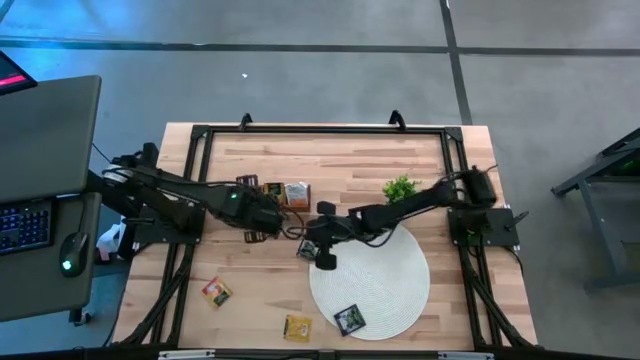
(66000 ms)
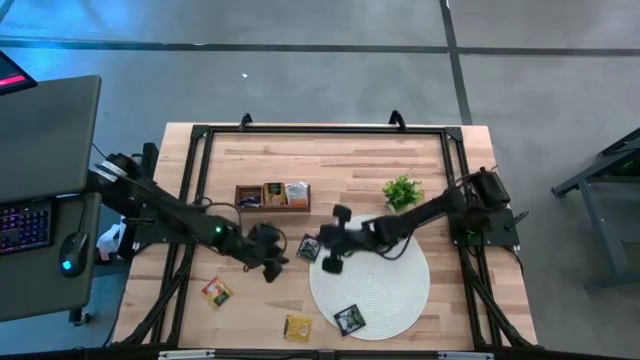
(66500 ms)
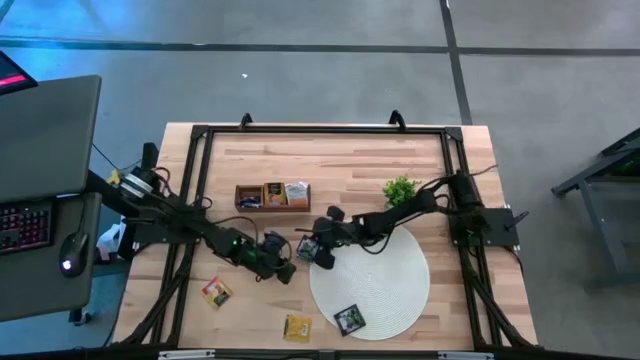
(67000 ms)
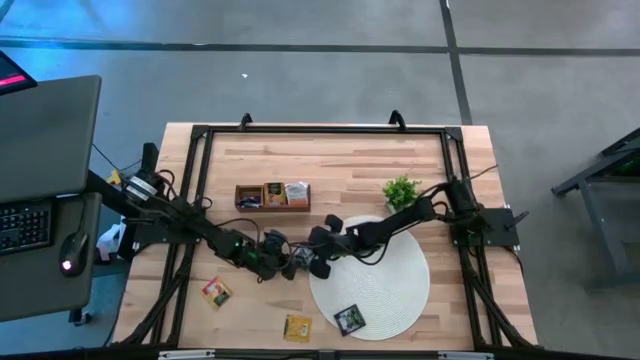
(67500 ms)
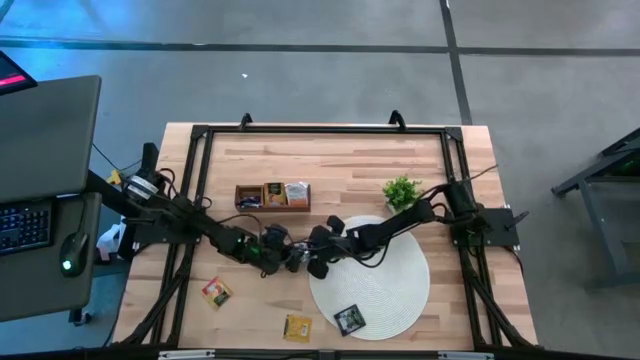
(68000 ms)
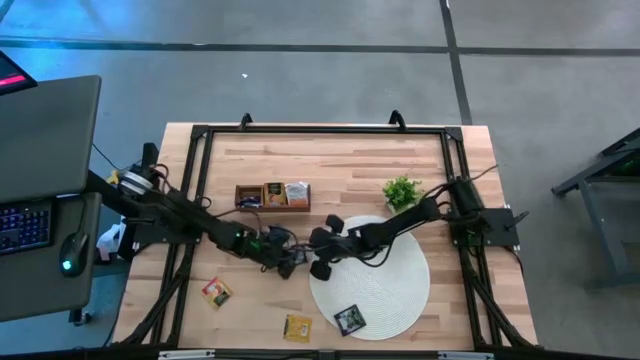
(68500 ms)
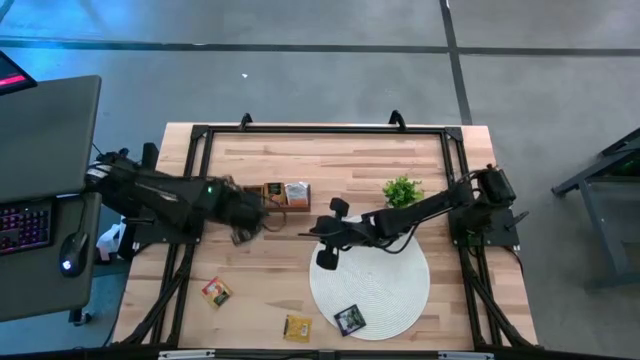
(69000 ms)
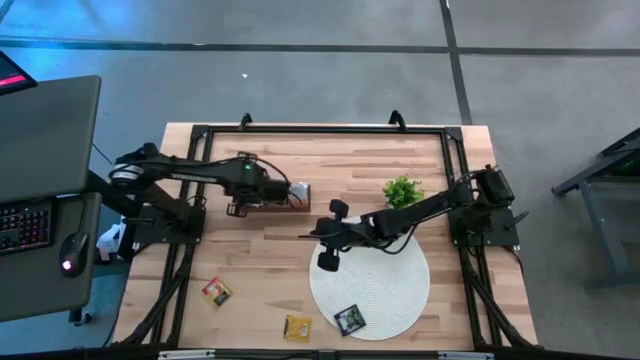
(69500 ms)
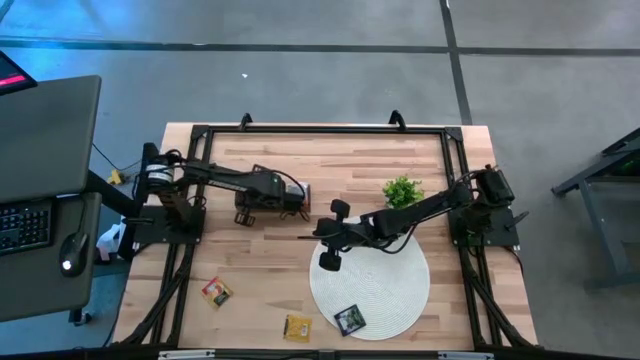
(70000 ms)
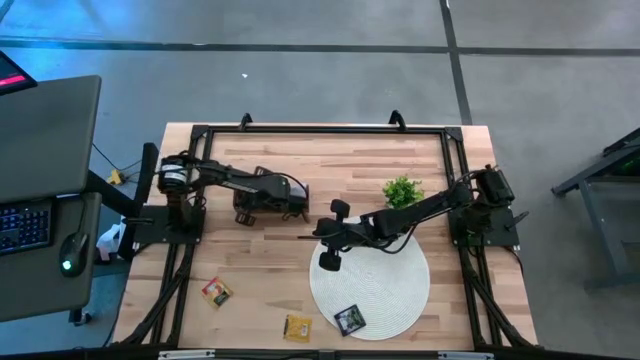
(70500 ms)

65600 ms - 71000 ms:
Task: Pick & Place Tea
Put the violet tea bag into the left section of the wooden organizer

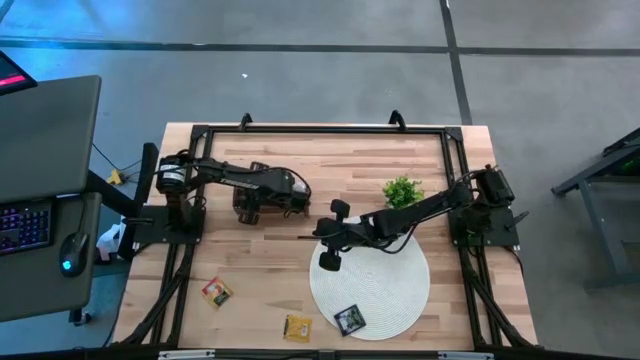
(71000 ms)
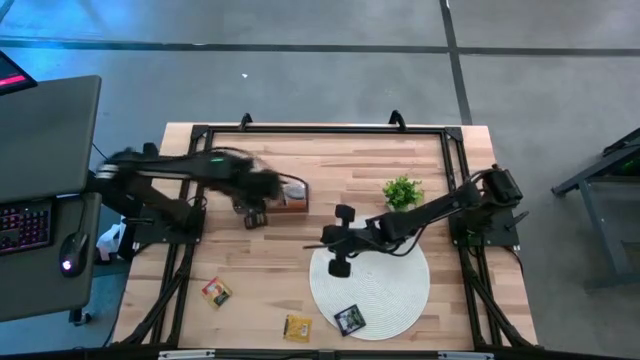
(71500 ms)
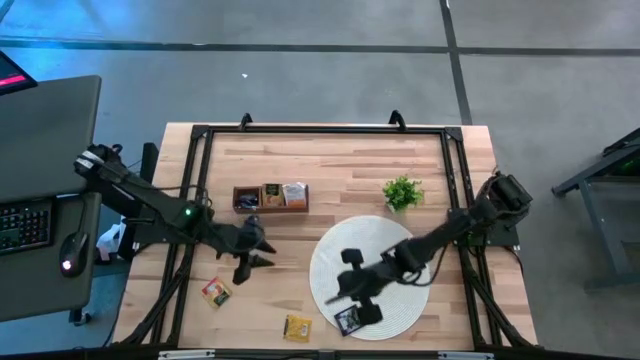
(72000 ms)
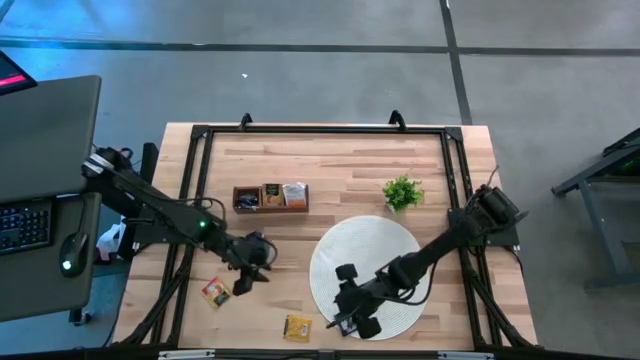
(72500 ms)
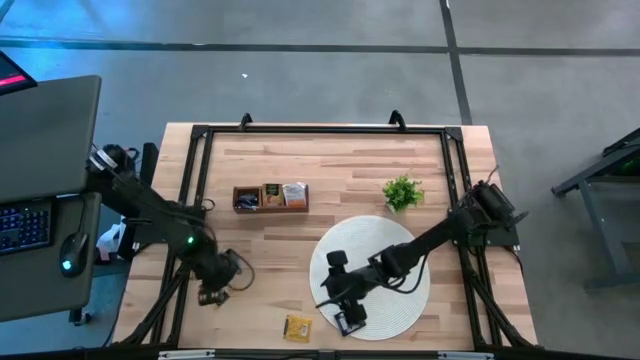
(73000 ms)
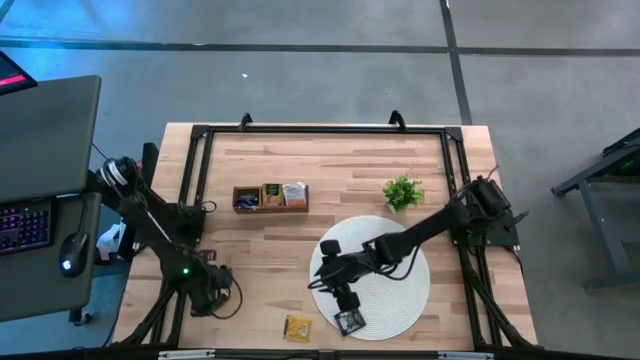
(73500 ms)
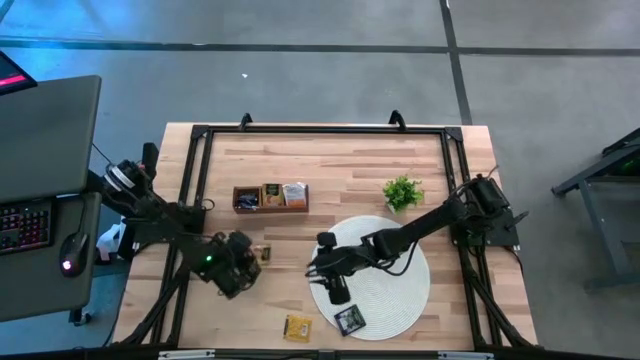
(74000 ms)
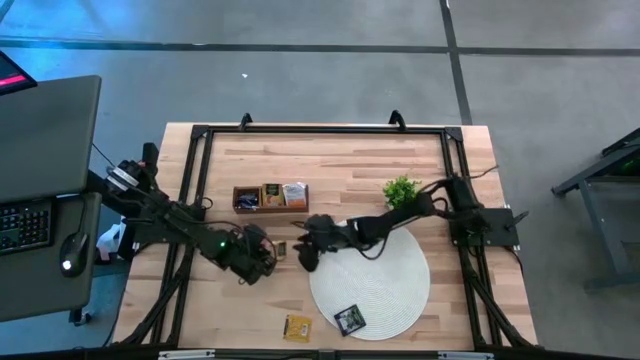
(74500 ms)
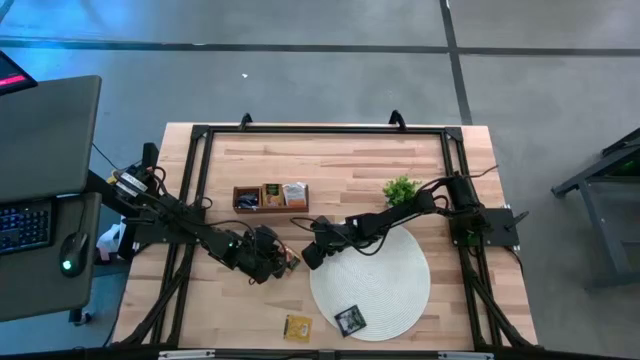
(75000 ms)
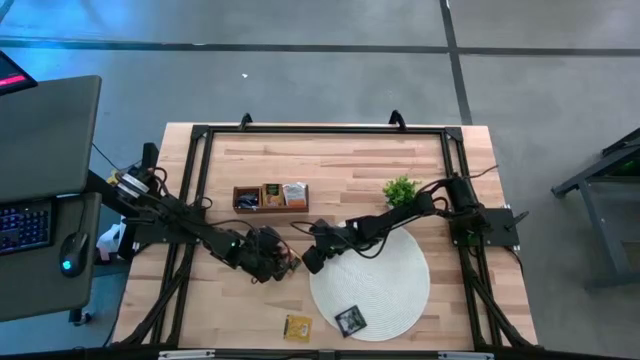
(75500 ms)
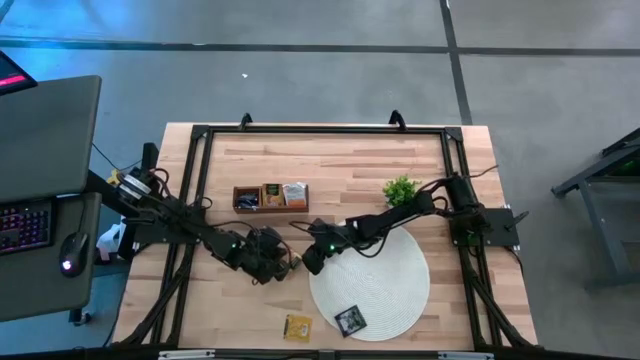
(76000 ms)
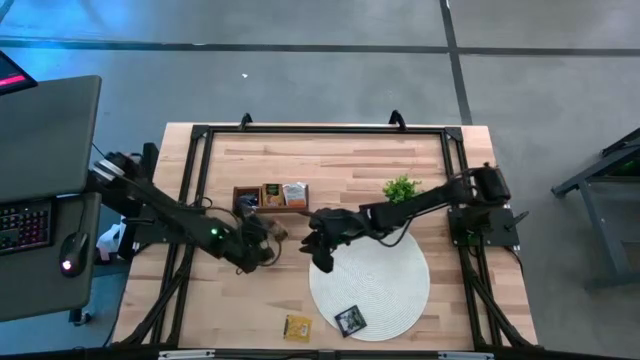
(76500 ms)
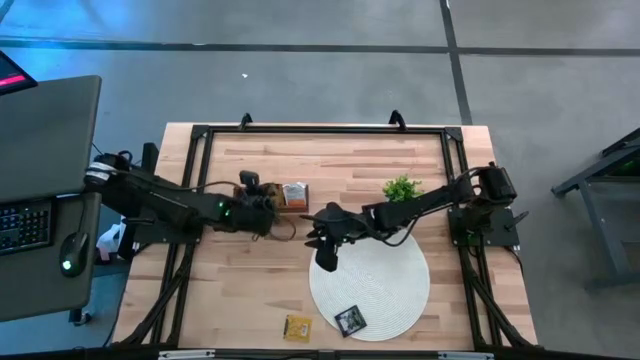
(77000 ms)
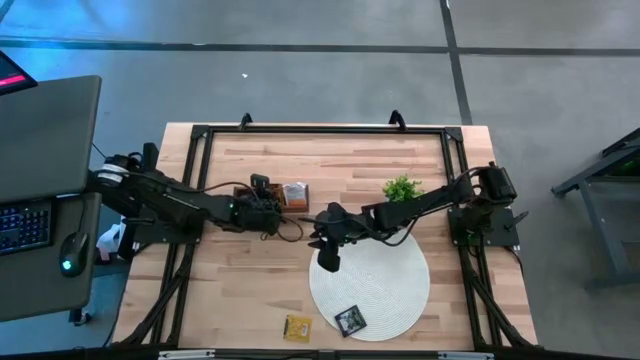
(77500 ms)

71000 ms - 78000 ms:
Put the yellow tea bag into the middle section of the wooden organizer

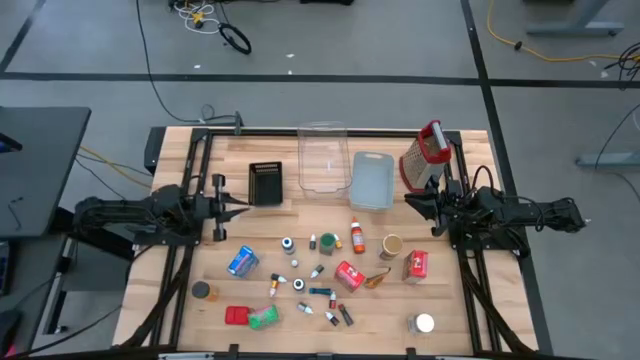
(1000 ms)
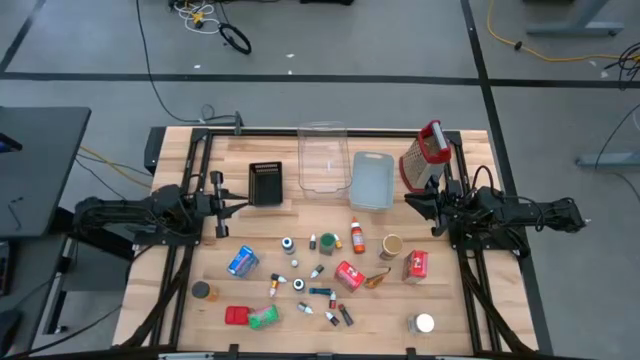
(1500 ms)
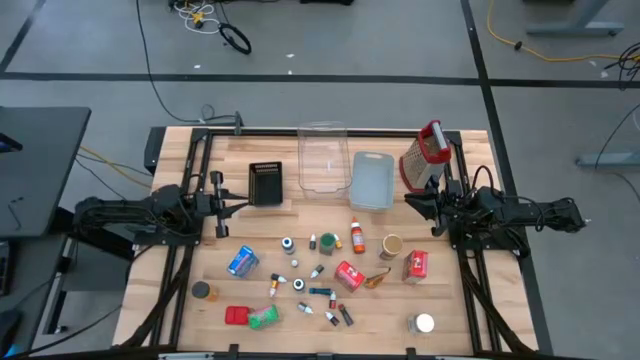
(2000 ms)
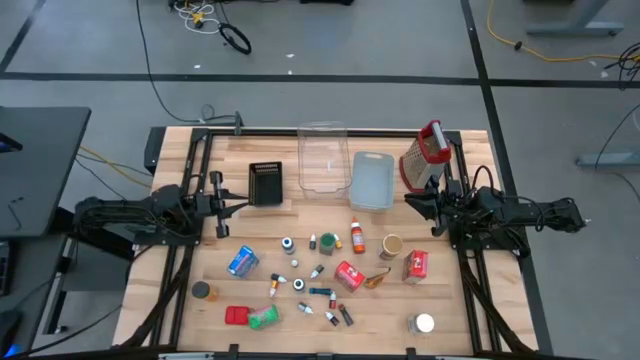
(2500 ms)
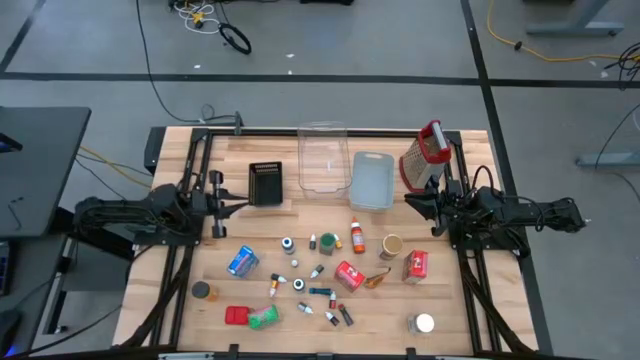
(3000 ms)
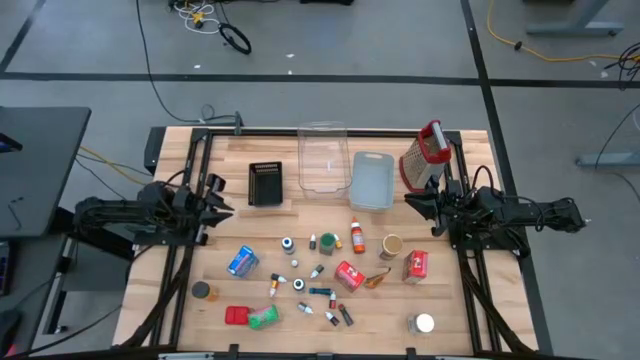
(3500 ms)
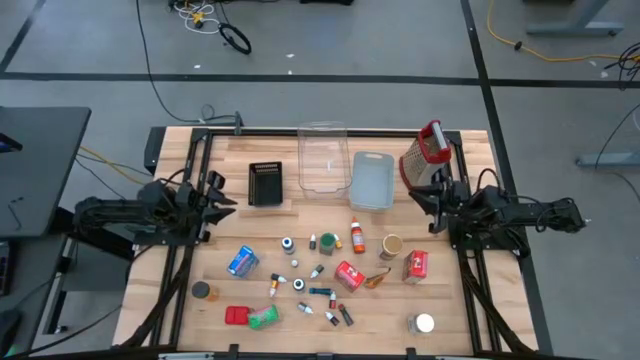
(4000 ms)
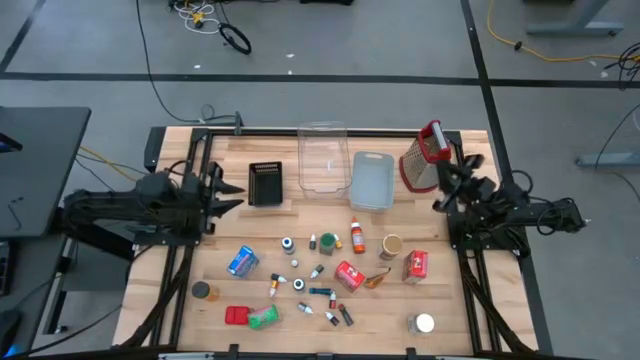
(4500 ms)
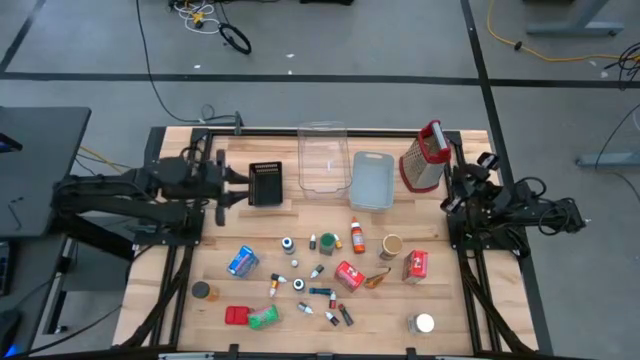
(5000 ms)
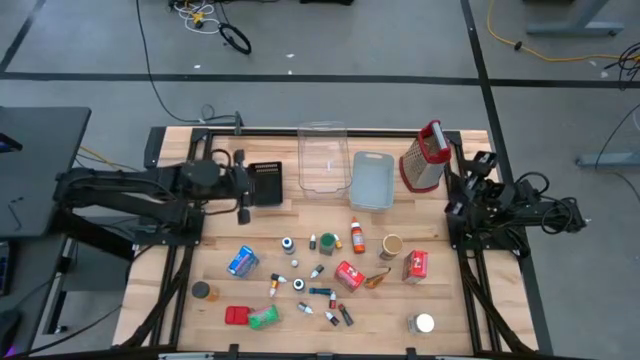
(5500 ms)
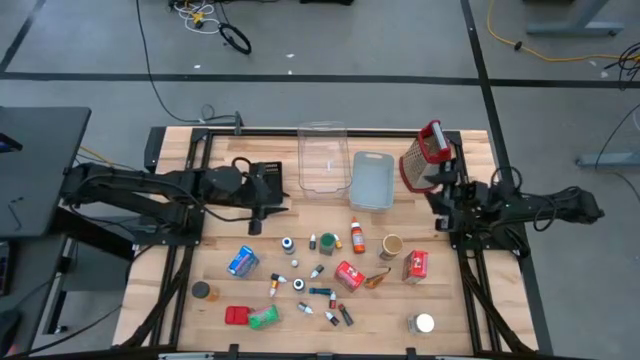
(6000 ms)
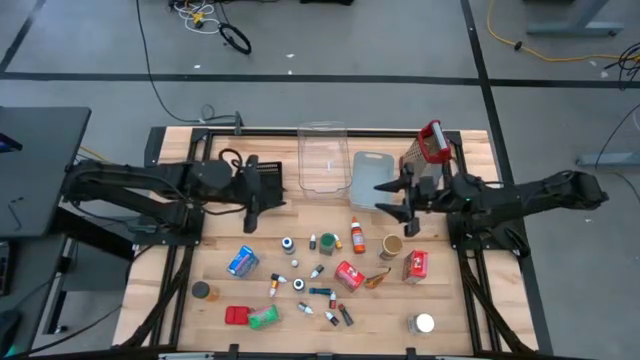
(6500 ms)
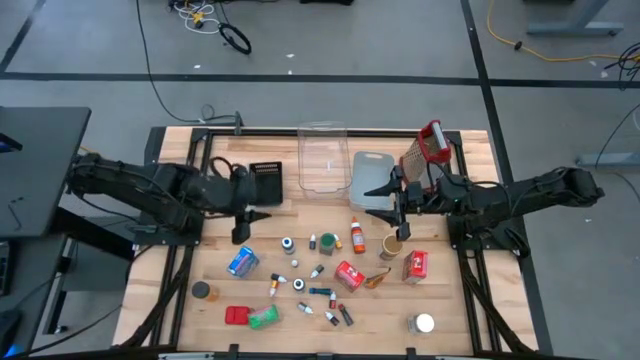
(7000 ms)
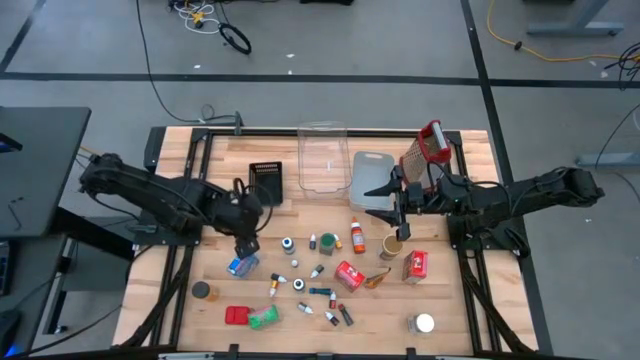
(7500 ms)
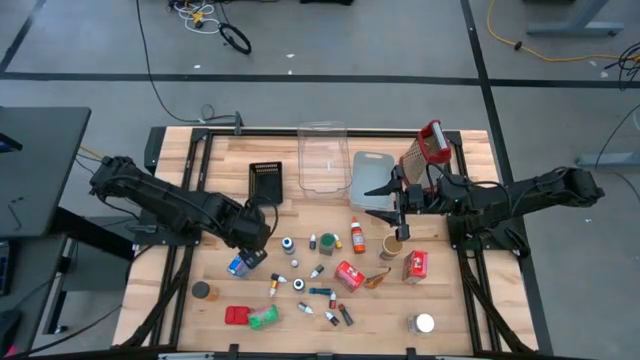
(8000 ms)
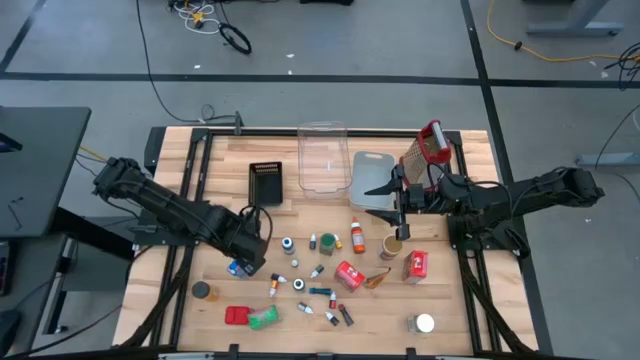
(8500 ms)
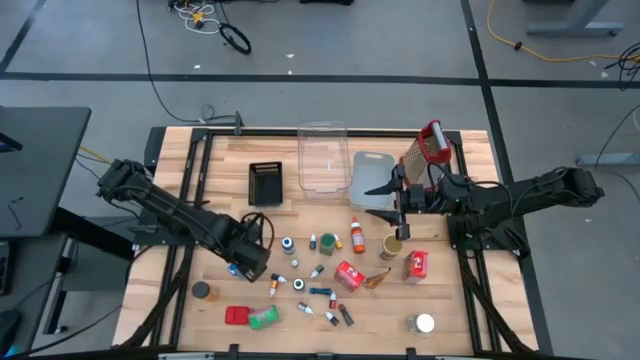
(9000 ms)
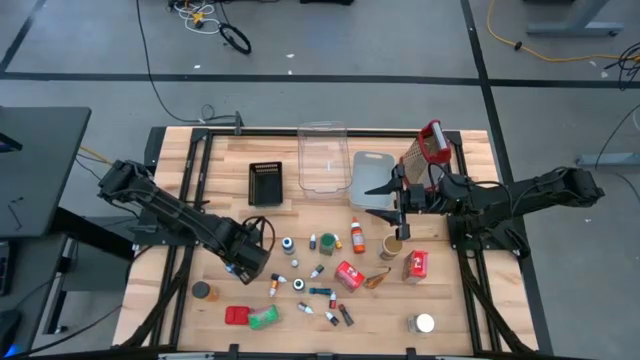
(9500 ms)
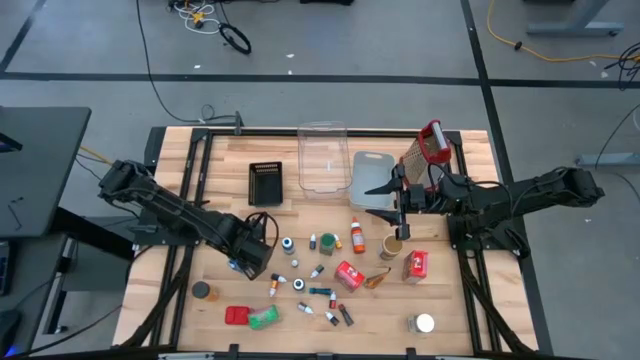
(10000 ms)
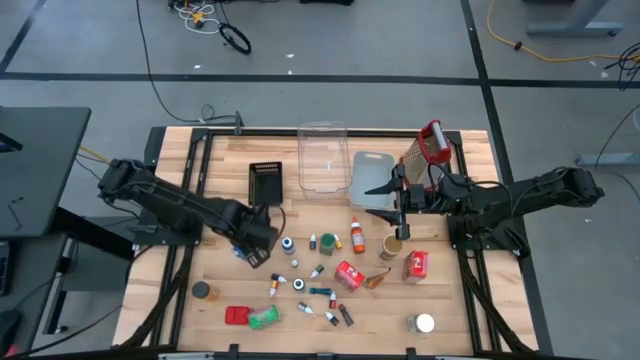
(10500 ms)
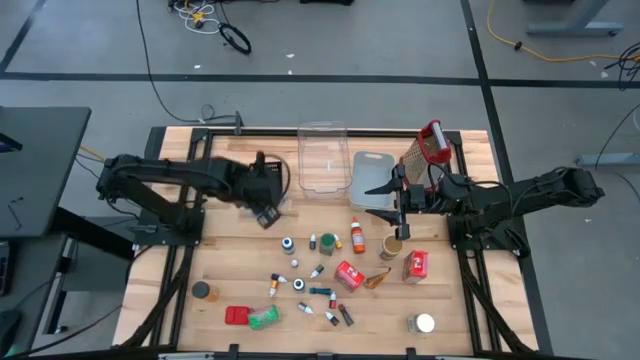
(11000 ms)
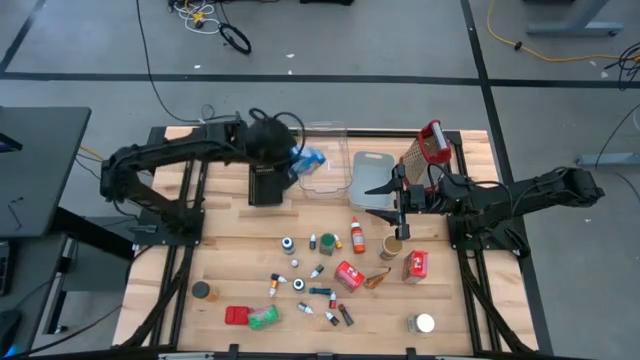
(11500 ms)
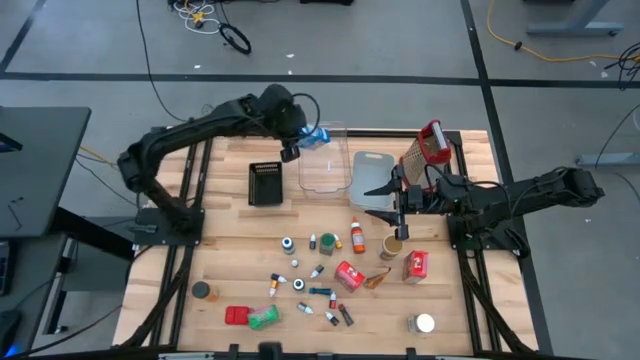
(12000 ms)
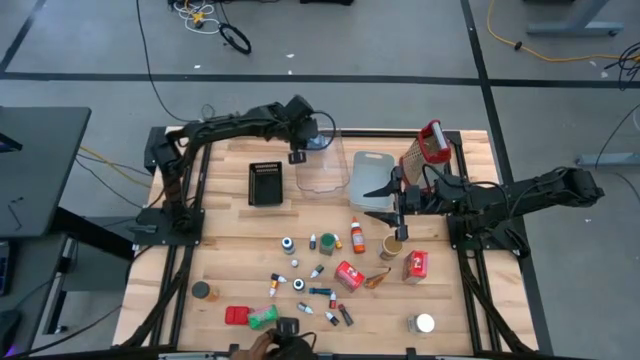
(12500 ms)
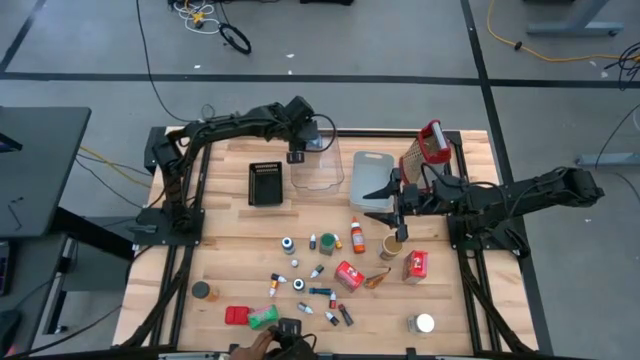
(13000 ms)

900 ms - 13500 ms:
Task: Pick & Place Kitchen Items
Put the blue cereal box into the transparent bin
